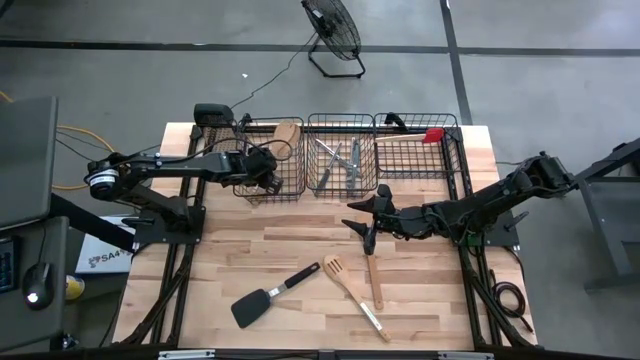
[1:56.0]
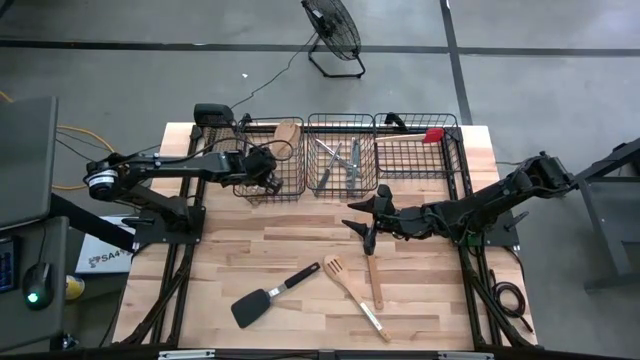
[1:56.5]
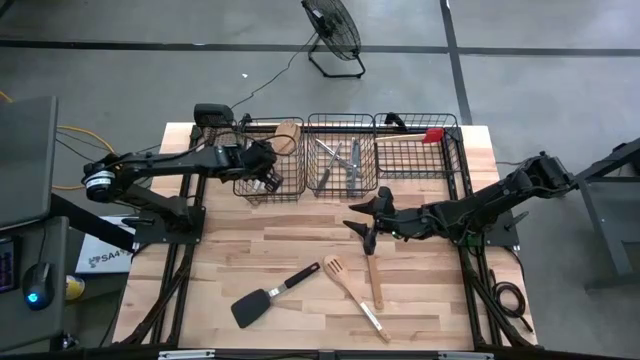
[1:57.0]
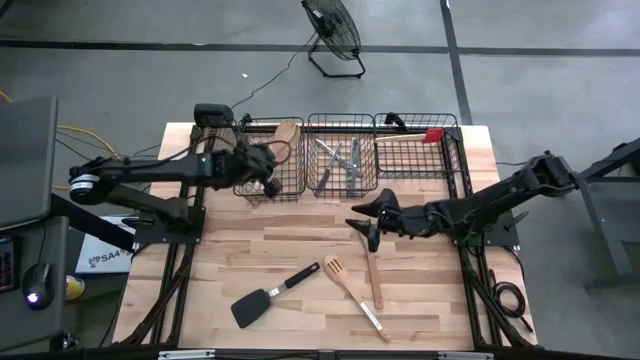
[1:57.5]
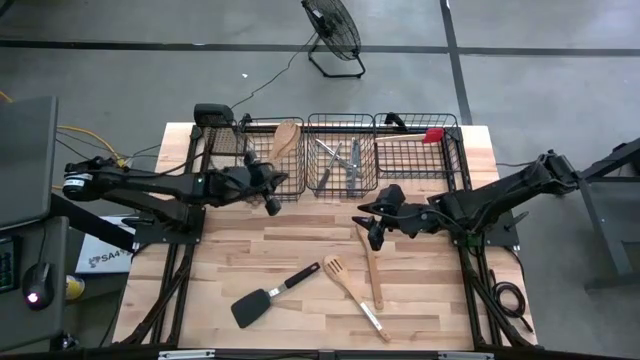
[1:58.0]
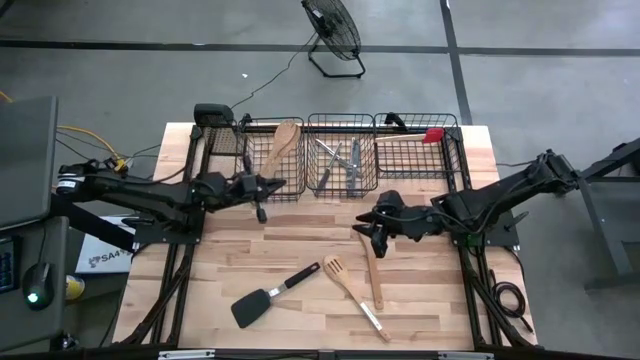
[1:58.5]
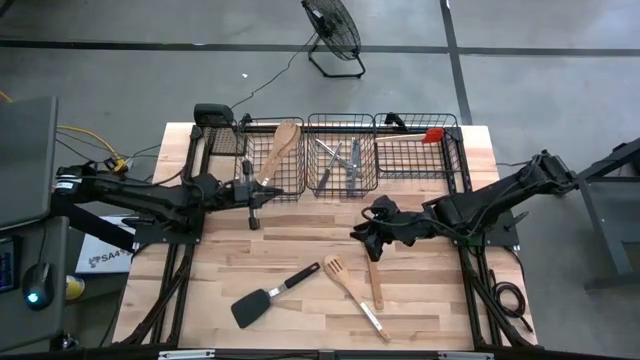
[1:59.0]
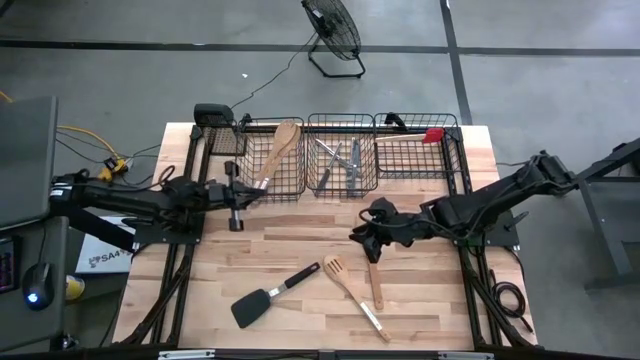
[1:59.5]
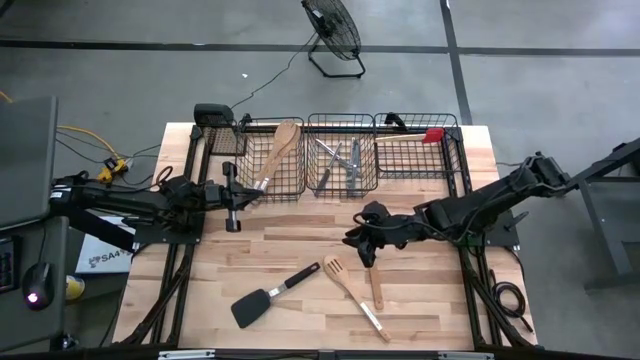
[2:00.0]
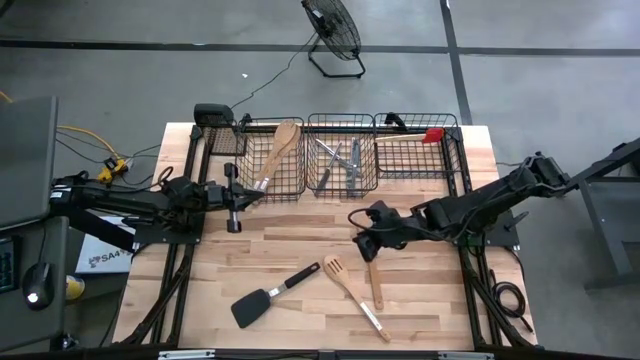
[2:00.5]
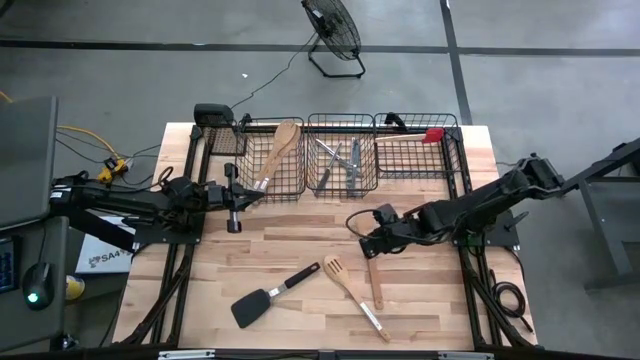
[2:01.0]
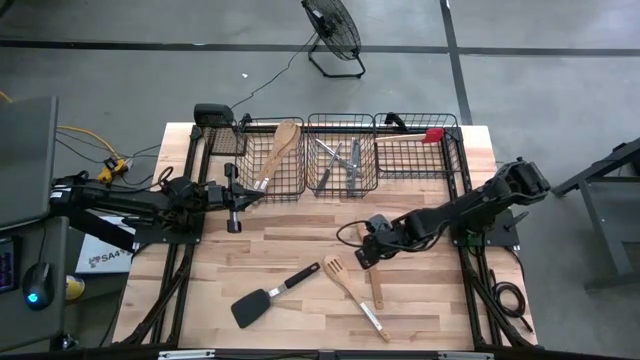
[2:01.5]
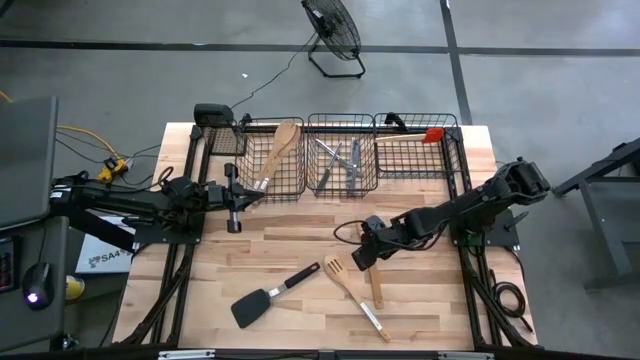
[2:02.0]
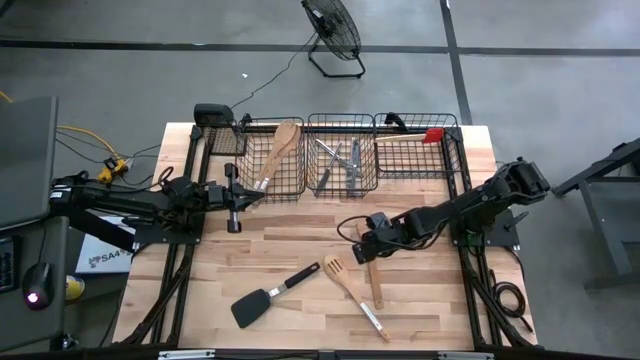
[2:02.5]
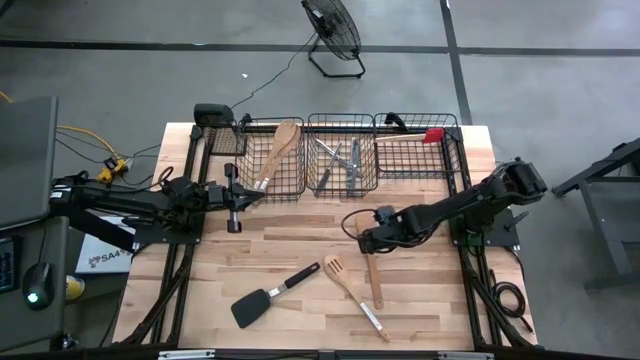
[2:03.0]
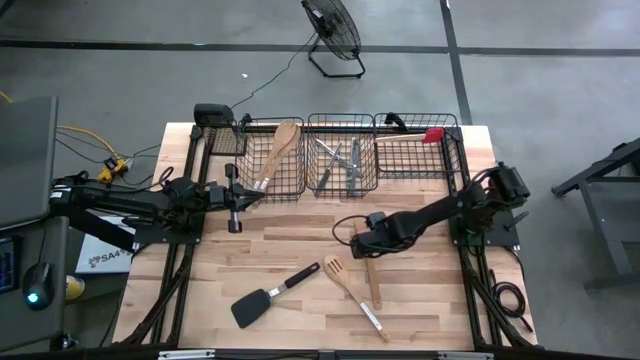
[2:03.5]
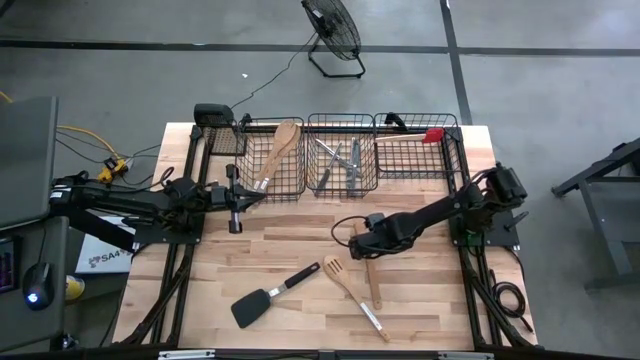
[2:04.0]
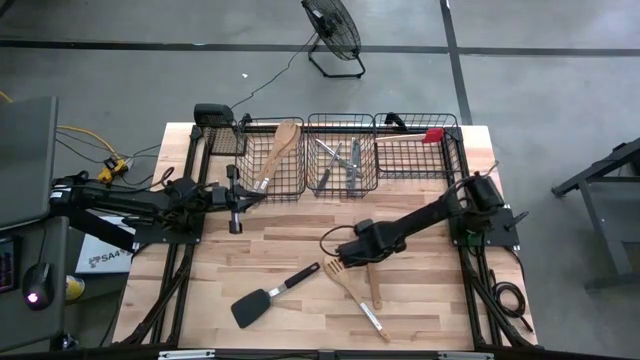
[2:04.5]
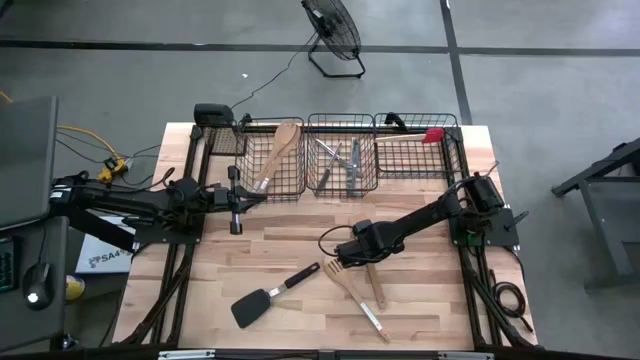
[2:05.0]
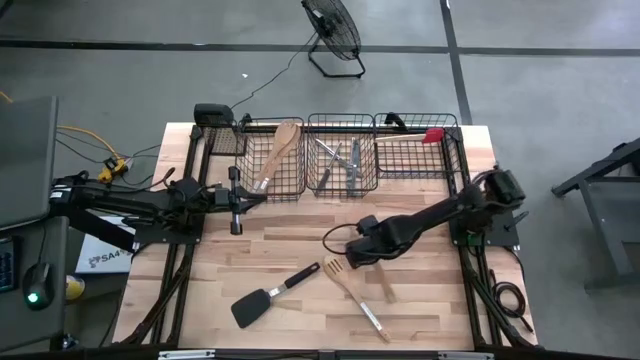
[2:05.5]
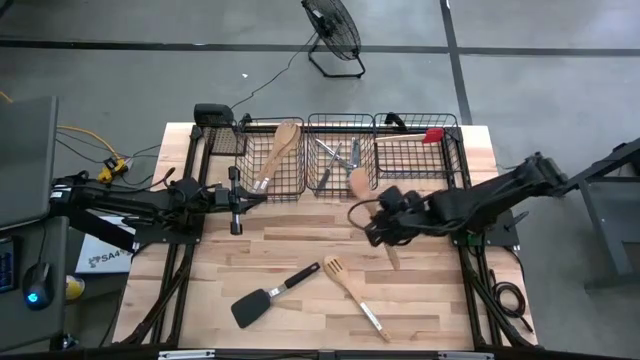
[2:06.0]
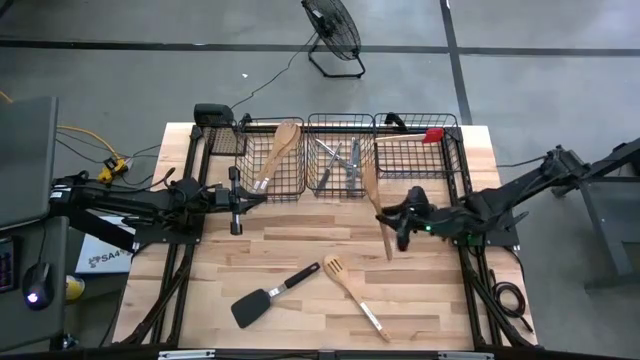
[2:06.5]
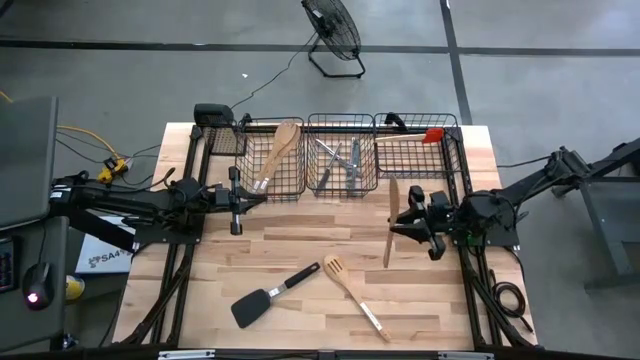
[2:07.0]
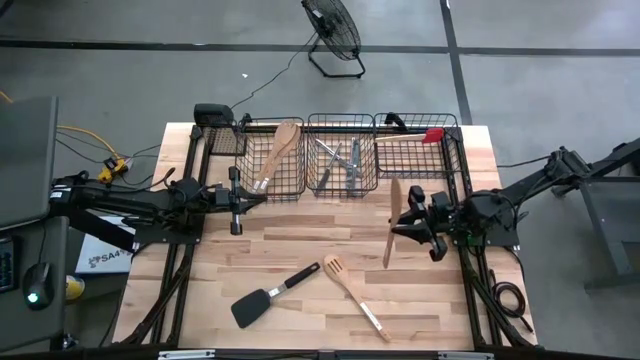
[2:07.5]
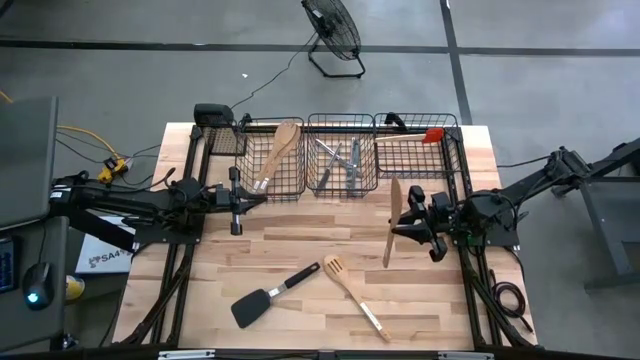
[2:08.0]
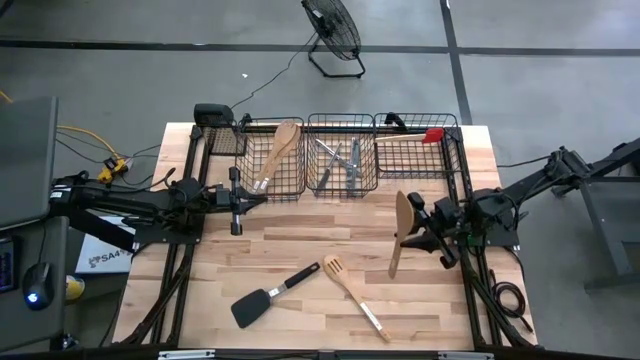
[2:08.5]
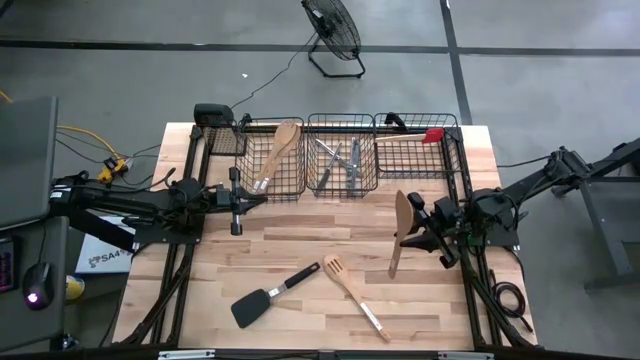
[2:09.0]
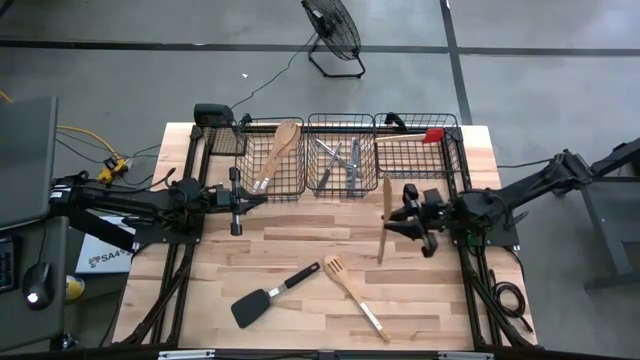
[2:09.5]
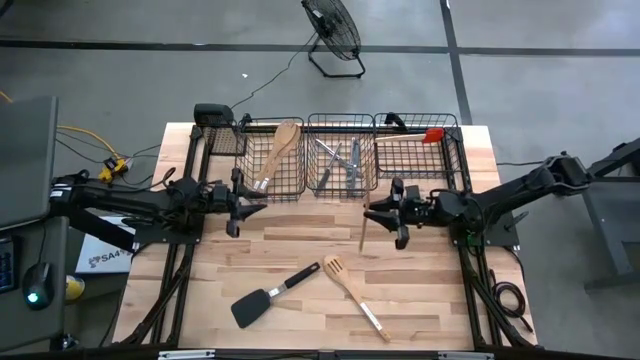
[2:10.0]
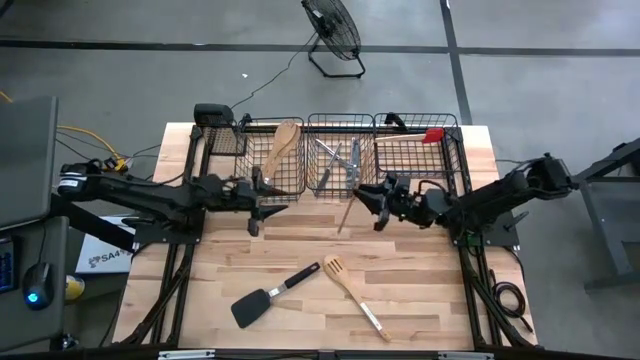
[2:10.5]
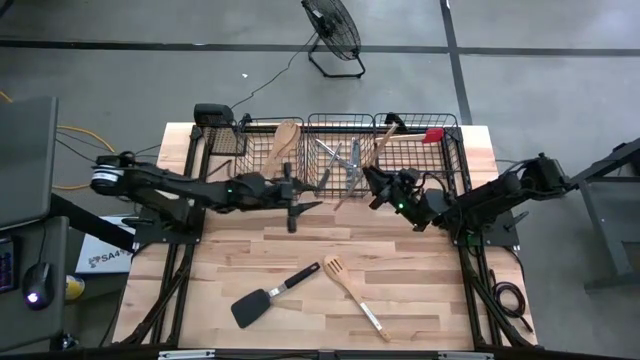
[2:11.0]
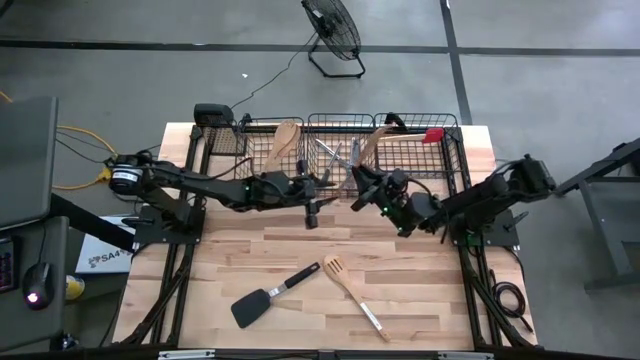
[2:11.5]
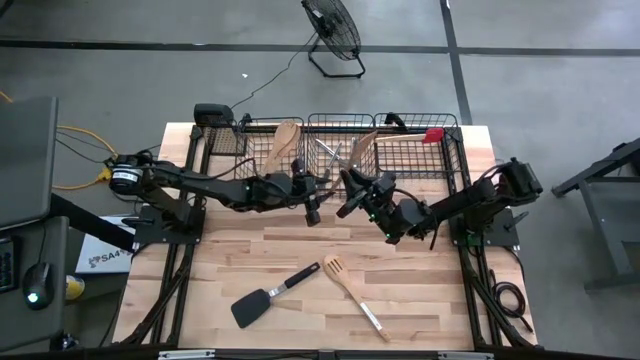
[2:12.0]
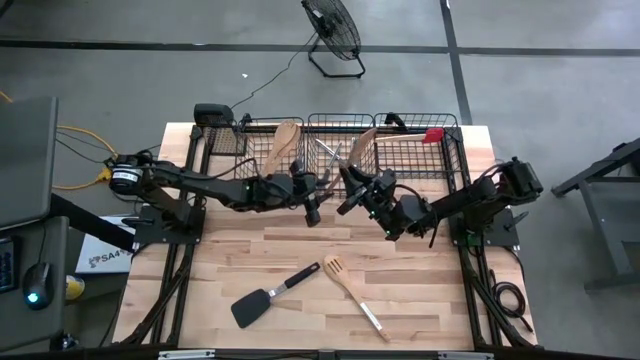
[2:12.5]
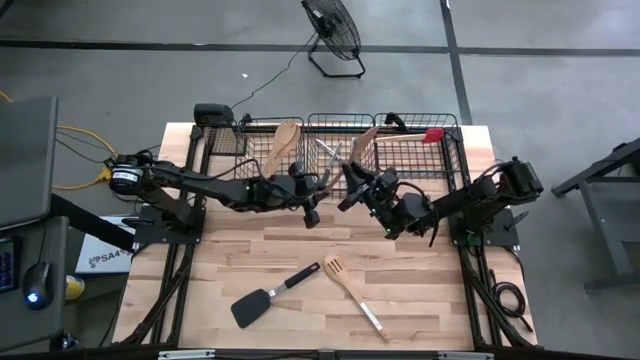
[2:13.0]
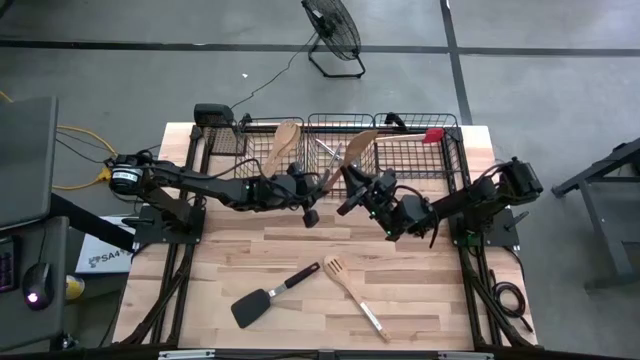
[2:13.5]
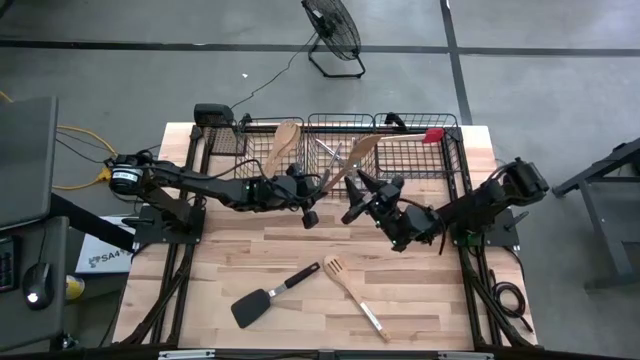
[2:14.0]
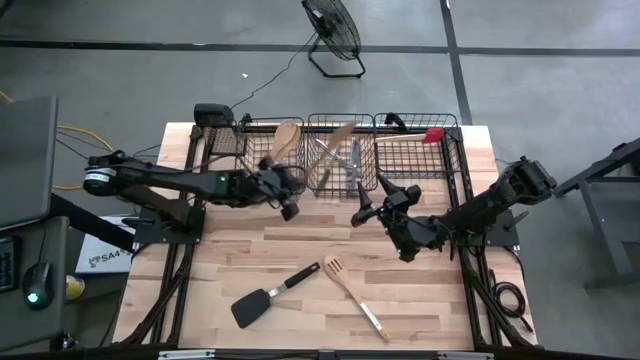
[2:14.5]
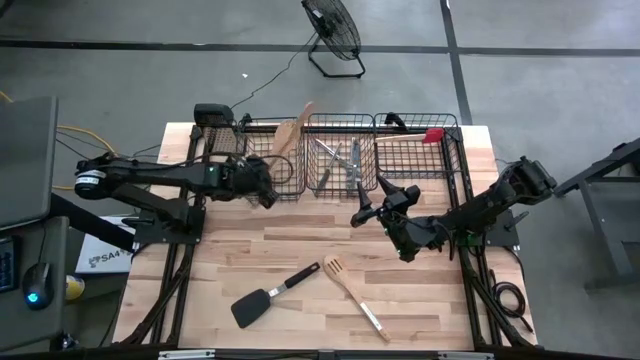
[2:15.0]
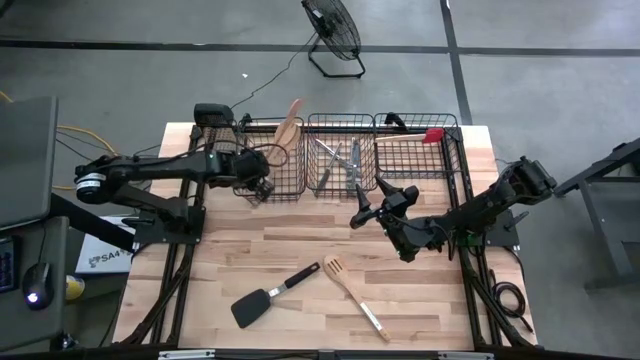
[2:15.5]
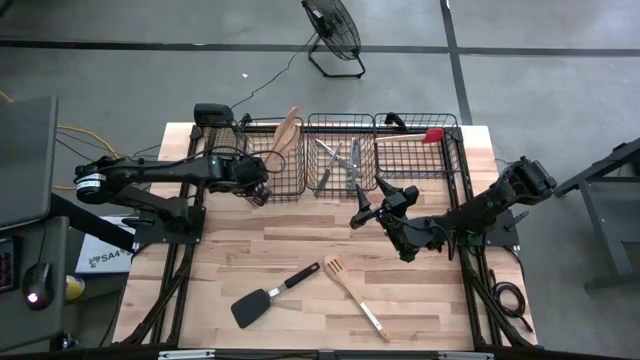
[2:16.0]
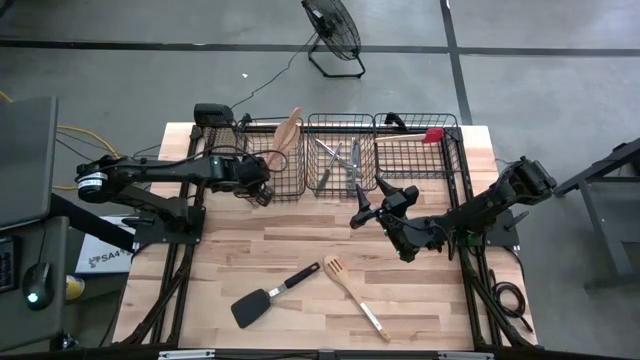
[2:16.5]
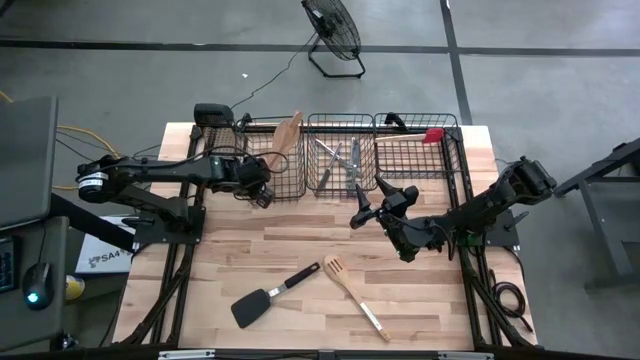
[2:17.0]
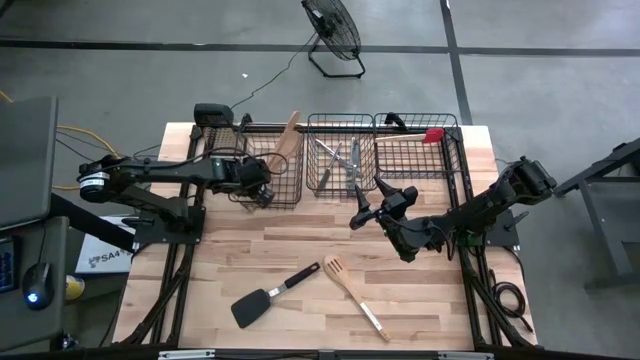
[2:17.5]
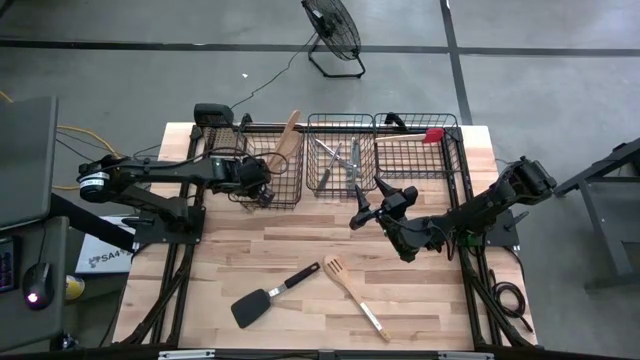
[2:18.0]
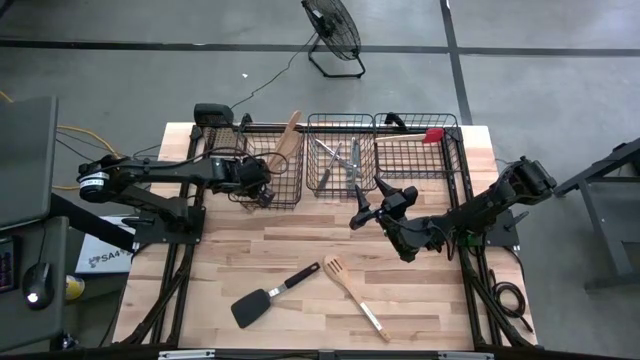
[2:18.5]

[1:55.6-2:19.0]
Task: Pick & Place Kitchen Items
Put the wooden serving spoon into the left wire basket
